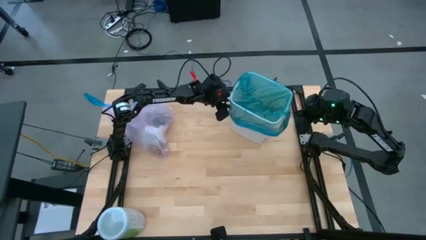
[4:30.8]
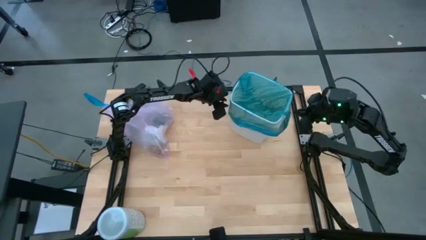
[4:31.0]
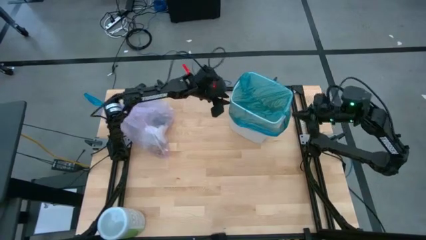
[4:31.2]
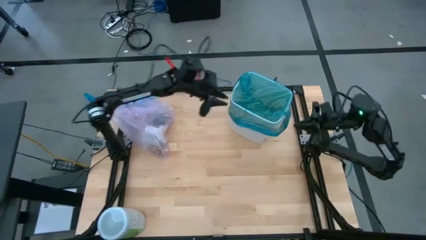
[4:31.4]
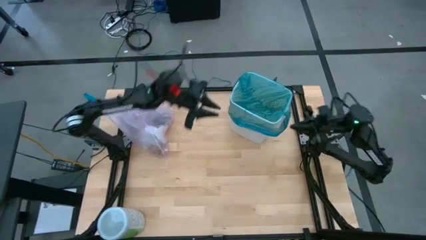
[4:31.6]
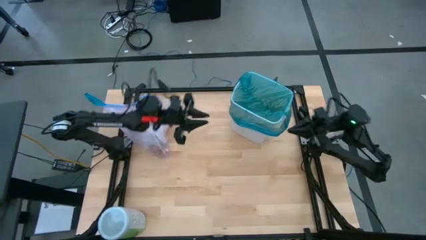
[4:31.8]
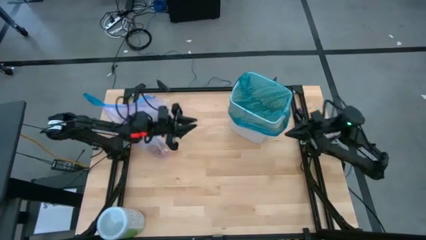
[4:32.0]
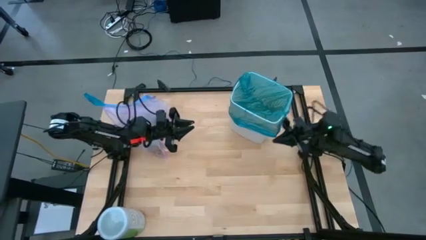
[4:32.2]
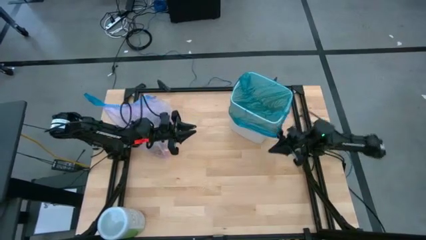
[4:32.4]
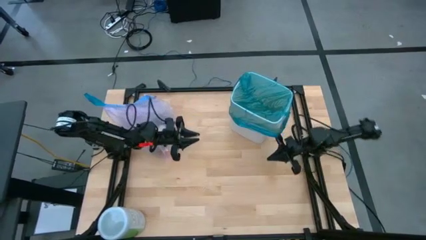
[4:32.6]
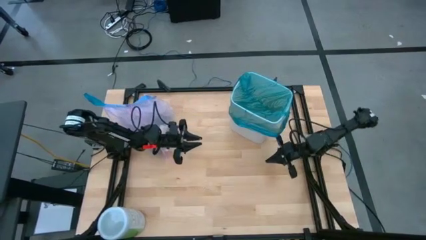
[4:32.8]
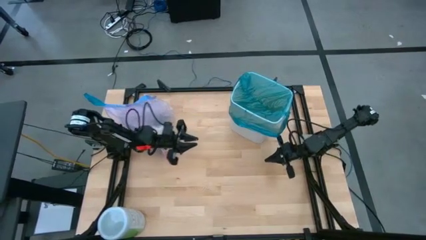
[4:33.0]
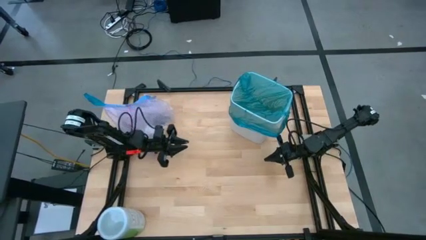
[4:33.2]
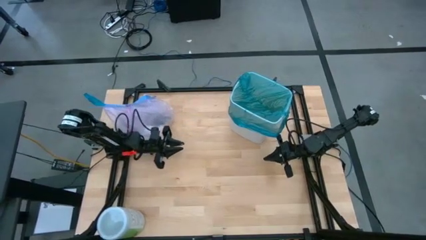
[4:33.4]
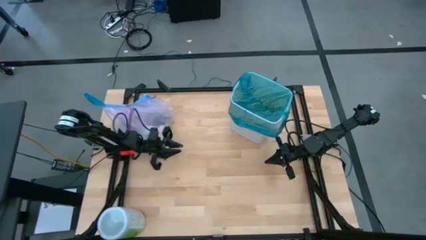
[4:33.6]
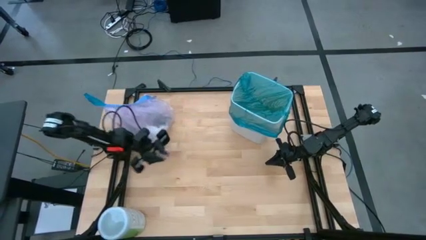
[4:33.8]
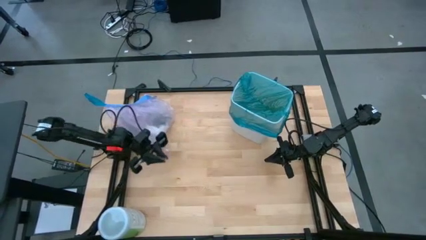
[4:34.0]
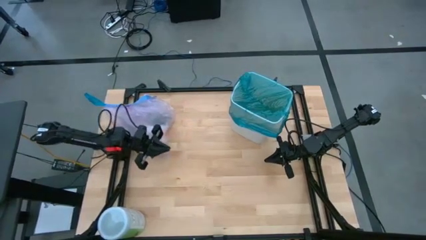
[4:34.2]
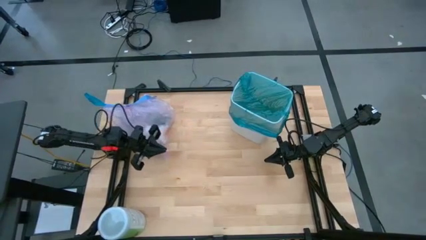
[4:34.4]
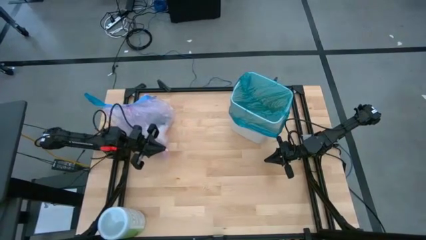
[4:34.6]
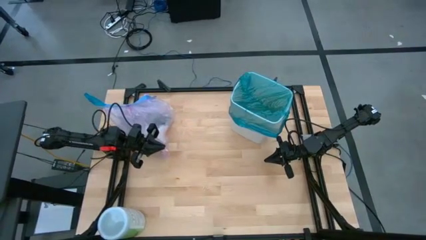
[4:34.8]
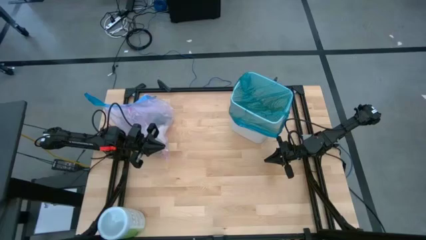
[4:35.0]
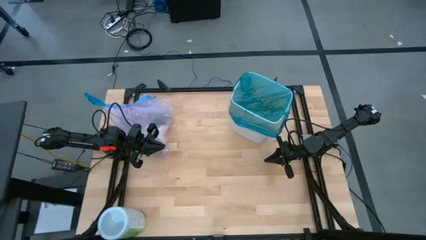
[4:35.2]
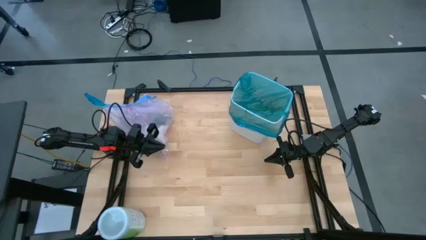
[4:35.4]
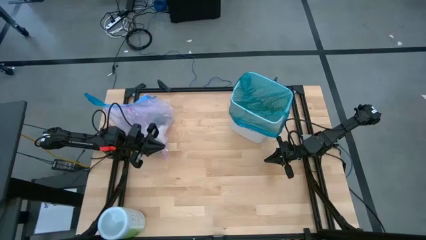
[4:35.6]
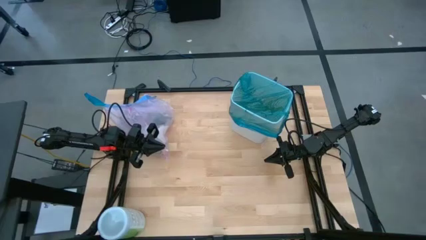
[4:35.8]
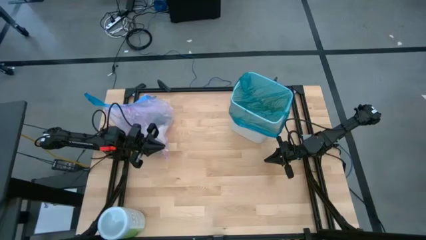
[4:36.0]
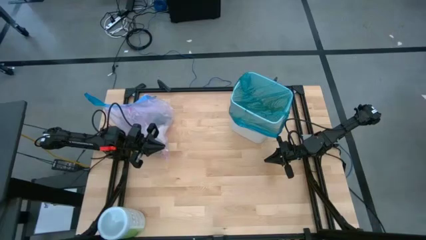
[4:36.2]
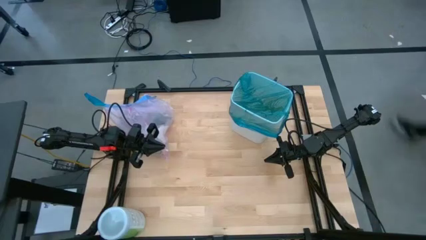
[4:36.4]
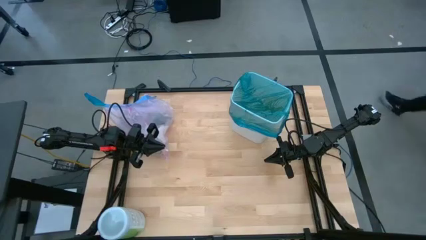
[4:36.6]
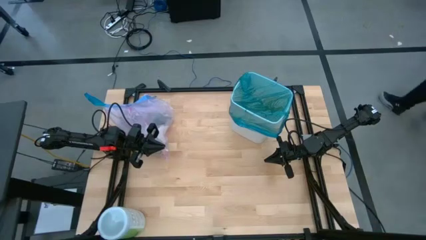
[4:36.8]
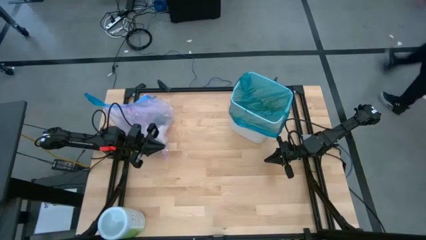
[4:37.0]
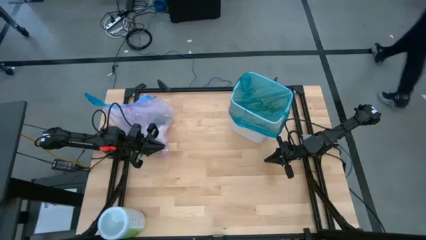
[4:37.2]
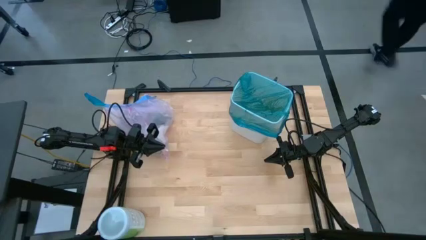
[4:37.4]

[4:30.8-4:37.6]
Task: place trash/remove bag and relplace
Return to Home Position

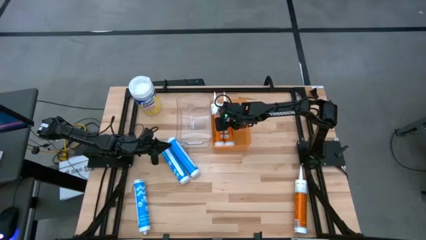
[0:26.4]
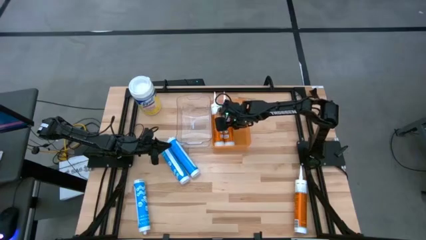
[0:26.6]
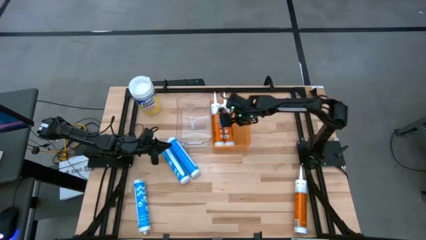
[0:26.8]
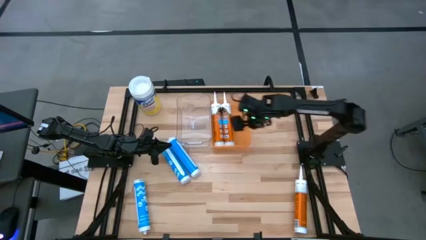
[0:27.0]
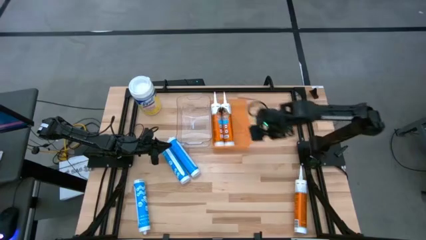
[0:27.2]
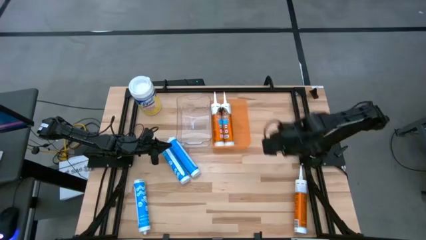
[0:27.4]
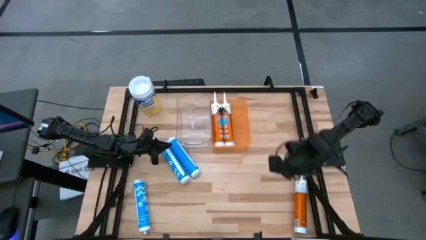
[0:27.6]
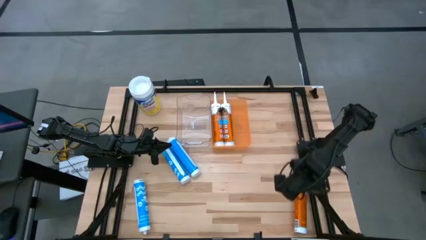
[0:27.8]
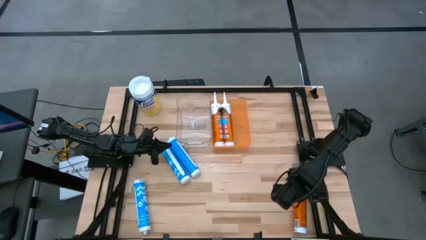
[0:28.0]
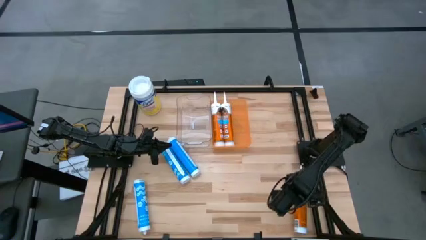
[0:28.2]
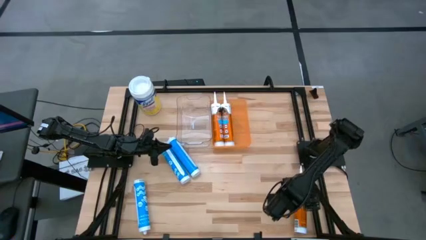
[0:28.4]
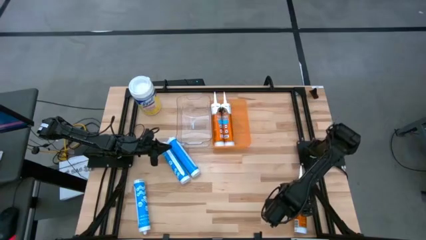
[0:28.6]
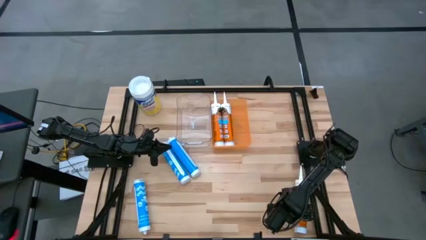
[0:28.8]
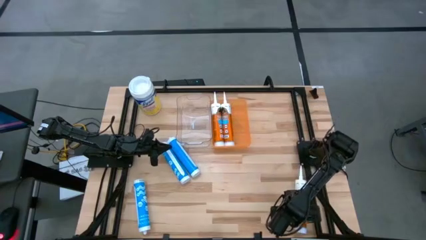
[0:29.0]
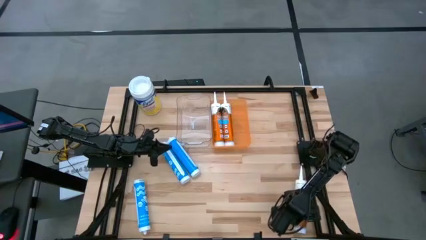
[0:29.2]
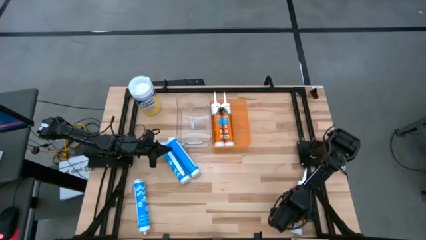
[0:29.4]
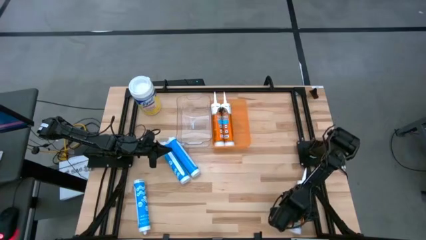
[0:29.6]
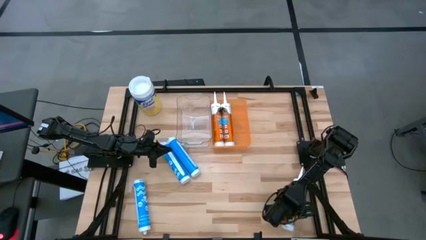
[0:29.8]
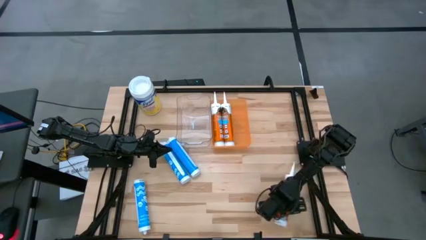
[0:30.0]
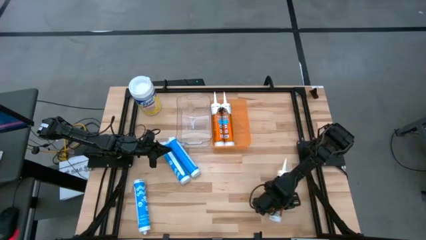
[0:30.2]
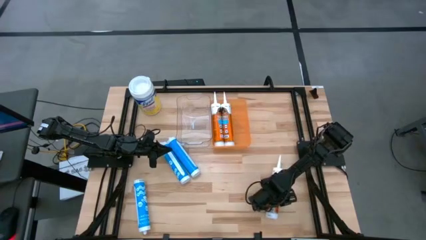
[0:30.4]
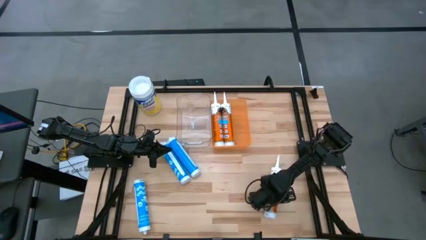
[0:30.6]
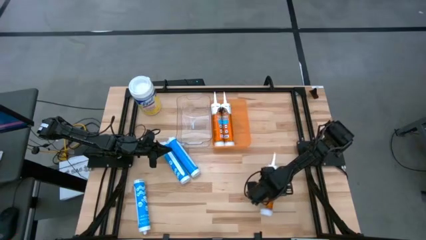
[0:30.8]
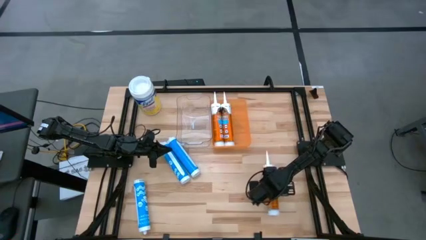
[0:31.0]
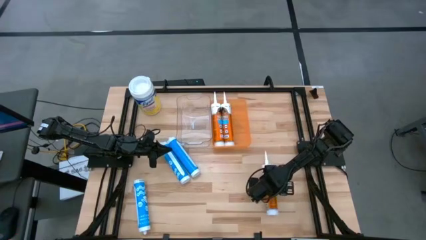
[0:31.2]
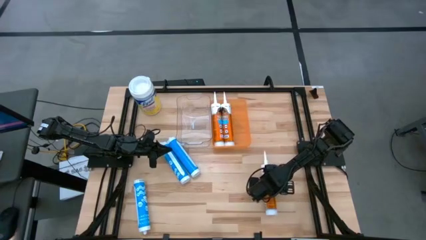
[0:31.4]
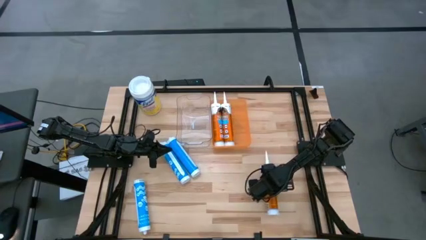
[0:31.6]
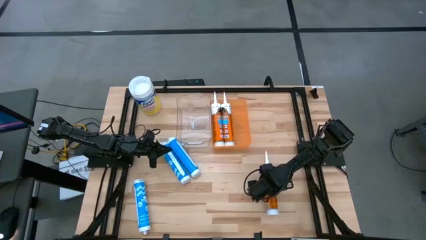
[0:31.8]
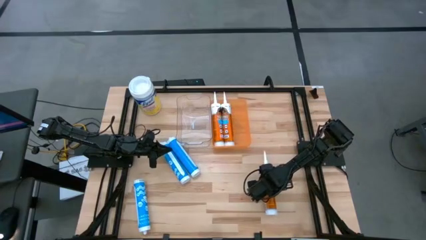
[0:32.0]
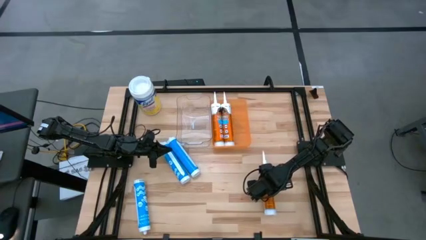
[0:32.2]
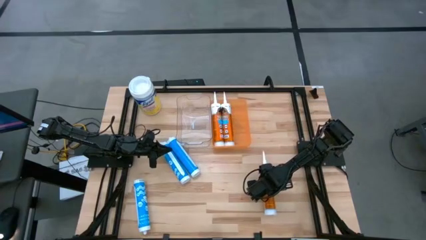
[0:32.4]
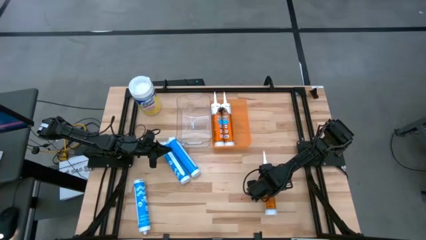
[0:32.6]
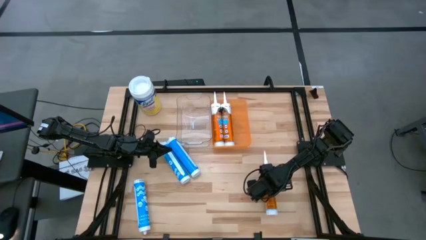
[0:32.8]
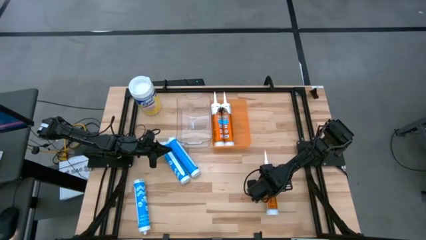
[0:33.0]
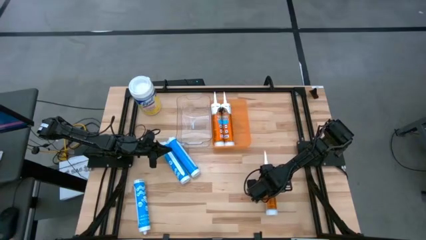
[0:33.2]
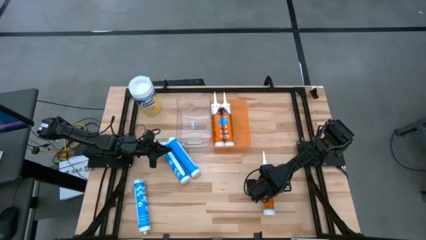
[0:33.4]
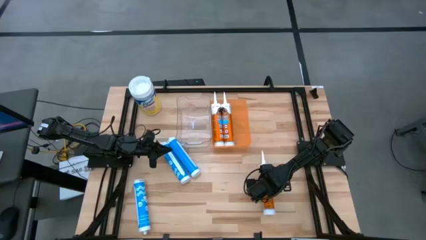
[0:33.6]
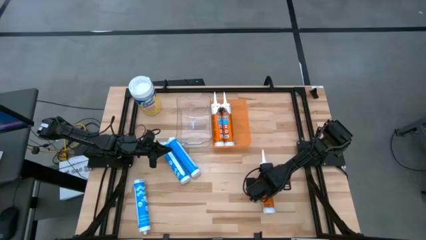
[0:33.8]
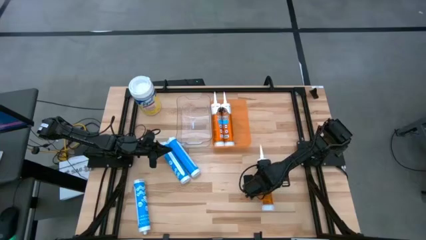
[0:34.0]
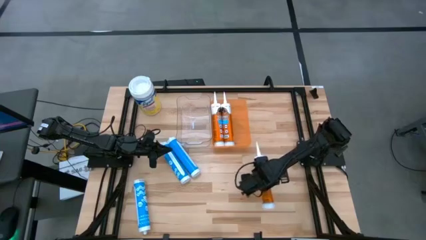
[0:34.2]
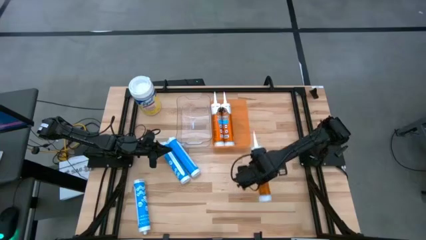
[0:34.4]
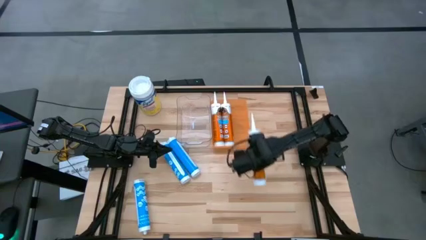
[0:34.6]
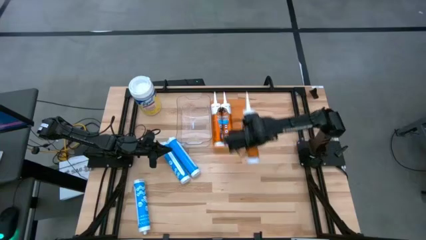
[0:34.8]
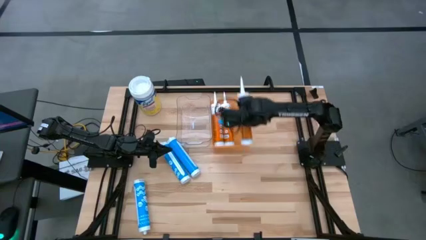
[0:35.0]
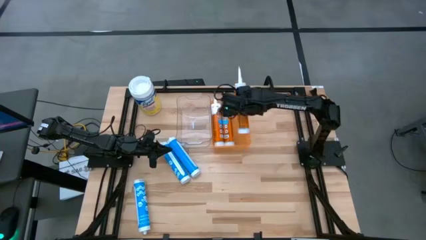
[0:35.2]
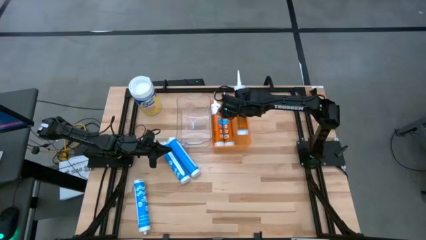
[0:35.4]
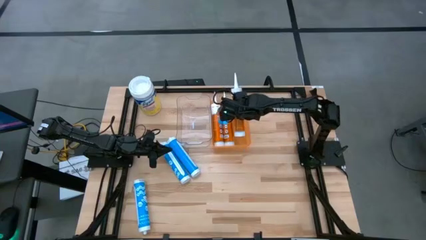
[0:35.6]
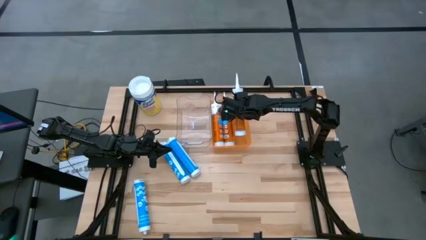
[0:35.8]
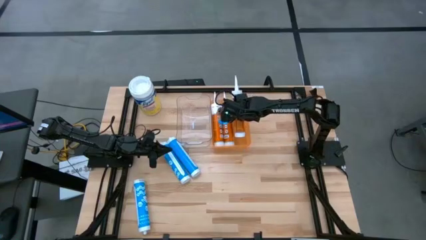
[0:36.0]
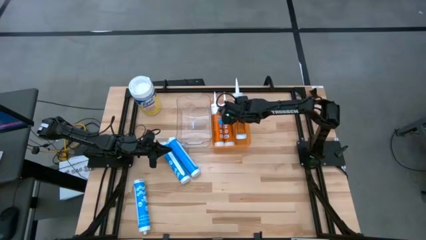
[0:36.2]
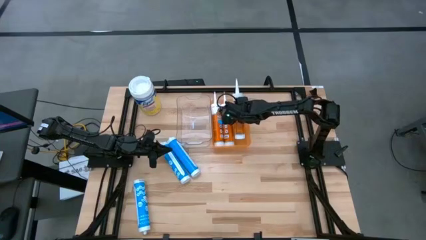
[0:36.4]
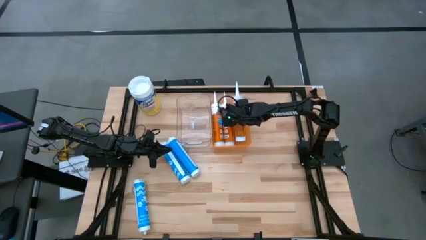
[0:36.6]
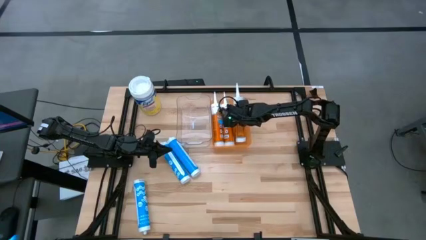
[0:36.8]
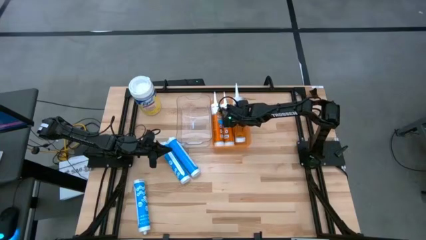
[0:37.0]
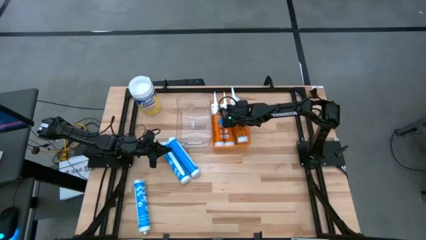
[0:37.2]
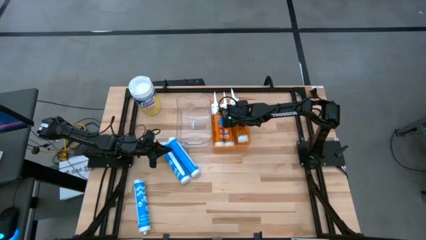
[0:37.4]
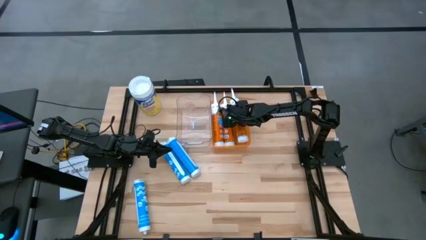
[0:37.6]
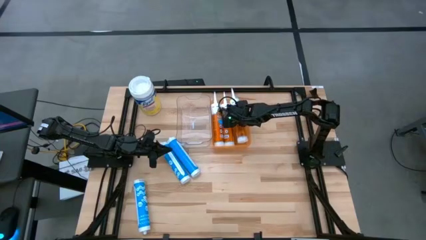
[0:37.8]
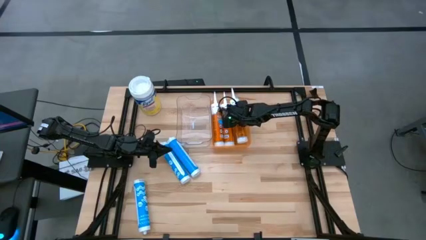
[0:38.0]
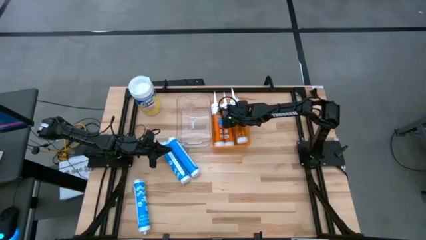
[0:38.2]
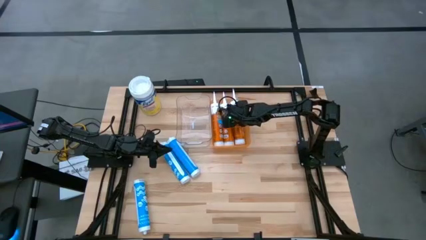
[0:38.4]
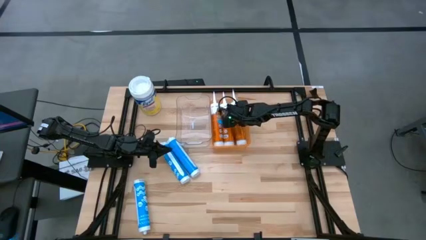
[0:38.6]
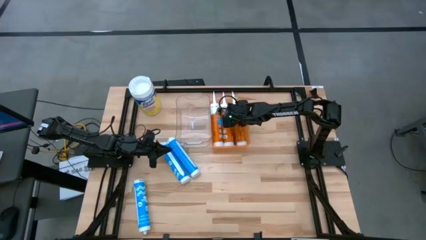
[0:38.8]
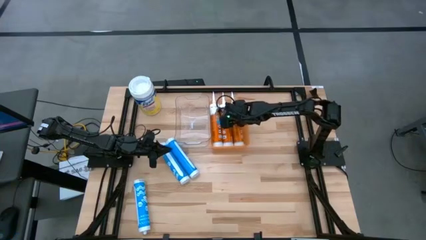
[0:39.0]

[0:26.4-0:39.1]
Task: Pick & place silicon tubes, Sealant and Lysol wipes
Put the orange sealant into the orange bin
